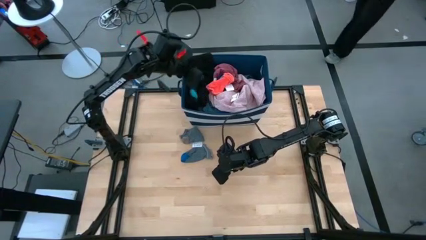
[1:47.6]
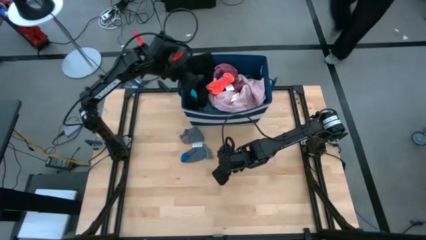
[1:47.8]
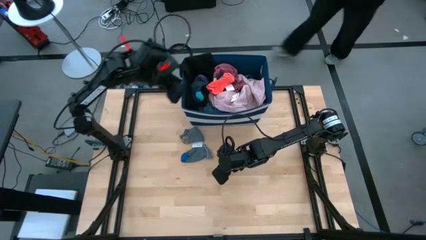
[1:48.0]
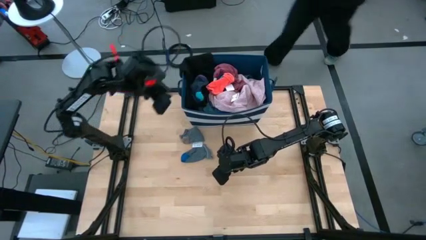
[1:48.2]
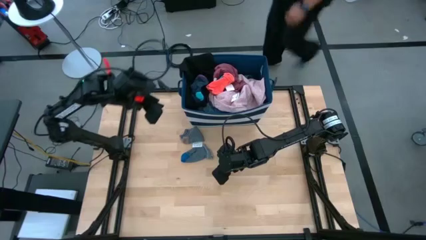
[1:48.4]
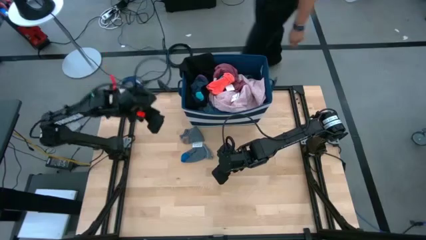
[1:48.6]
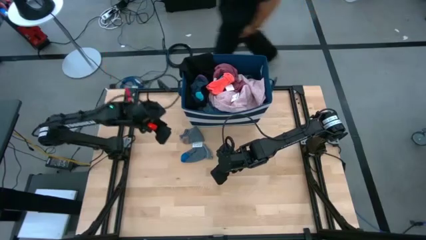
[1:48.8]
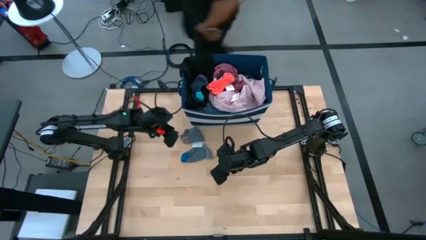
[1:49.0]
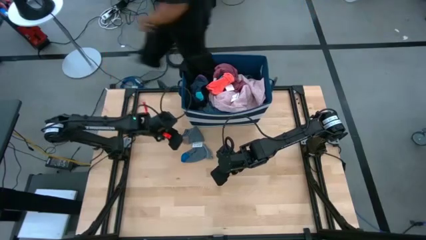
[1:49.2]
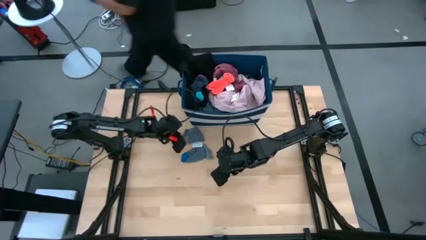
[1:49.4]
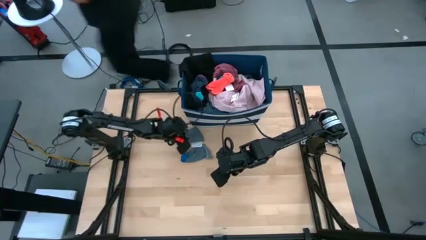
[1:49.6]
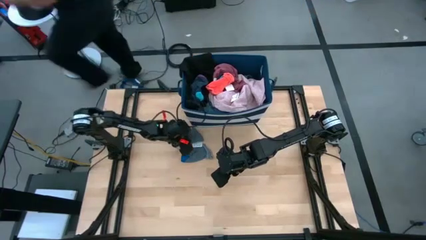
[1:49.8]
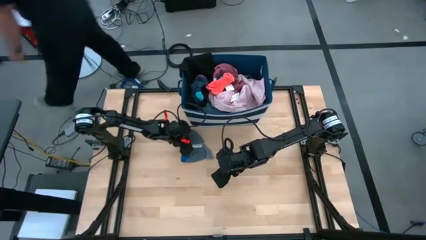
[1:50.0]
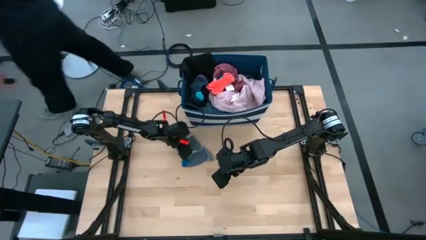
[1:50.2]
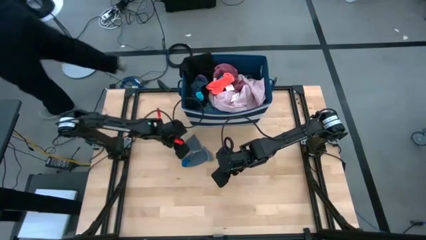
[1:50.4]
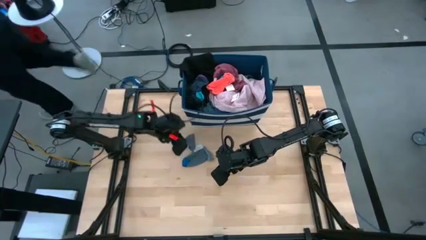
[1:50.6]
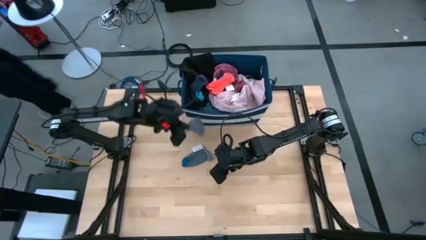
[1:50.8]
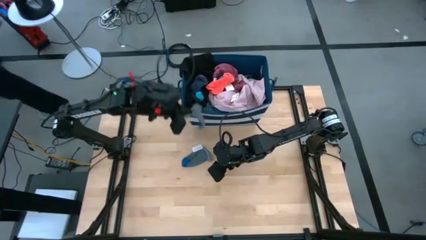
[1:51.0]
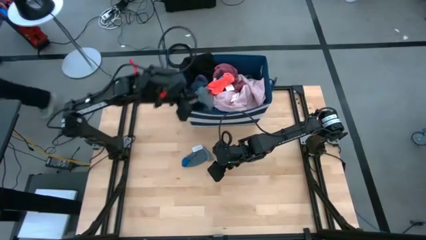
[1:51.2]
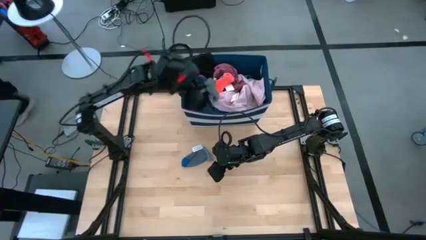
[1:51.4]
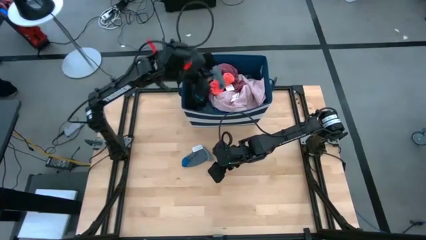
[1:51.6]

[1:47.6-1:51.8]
Task: Sort clothes
Put the gray sock into the blue bin

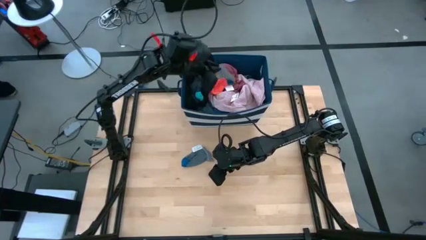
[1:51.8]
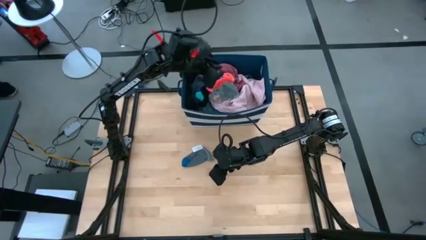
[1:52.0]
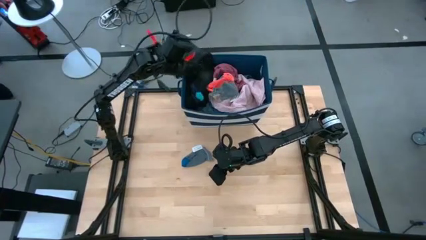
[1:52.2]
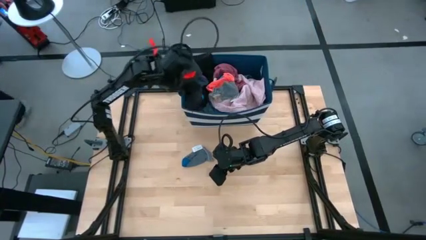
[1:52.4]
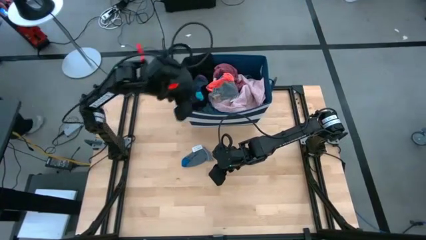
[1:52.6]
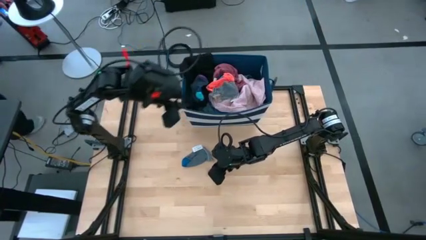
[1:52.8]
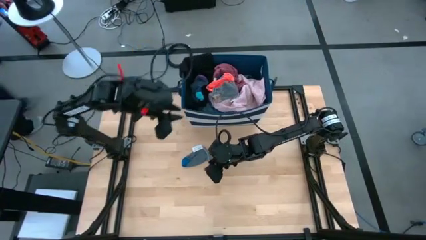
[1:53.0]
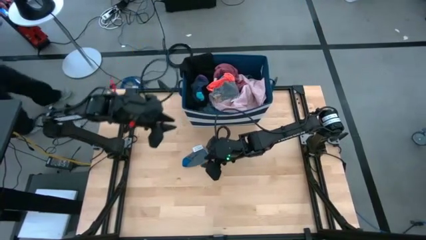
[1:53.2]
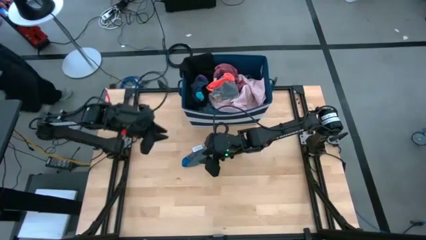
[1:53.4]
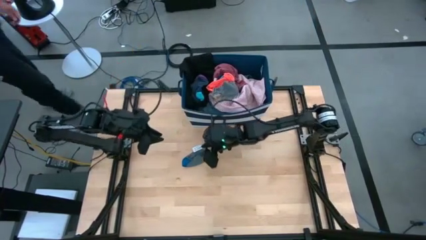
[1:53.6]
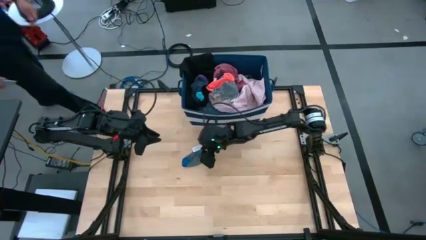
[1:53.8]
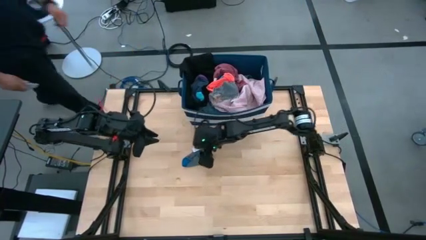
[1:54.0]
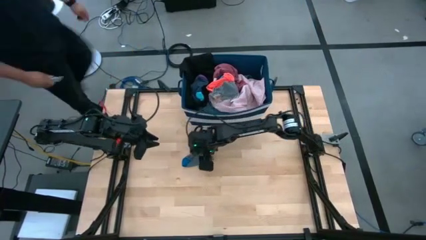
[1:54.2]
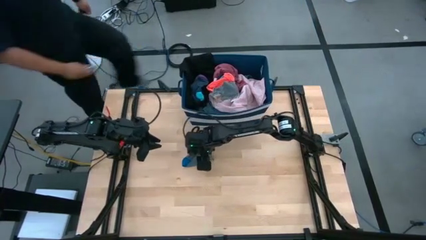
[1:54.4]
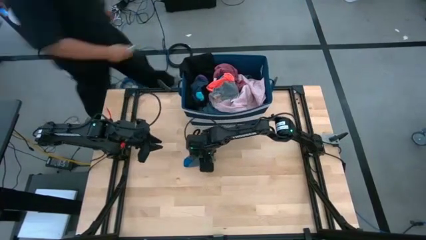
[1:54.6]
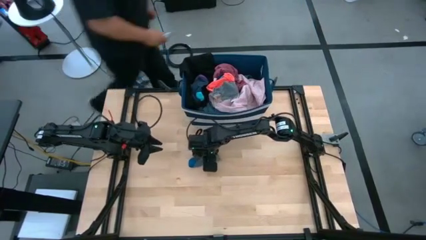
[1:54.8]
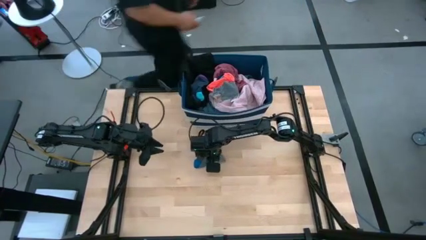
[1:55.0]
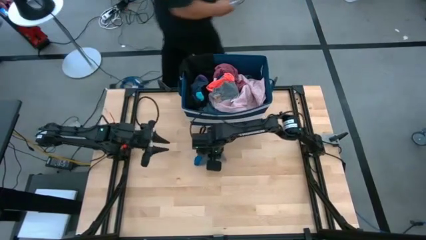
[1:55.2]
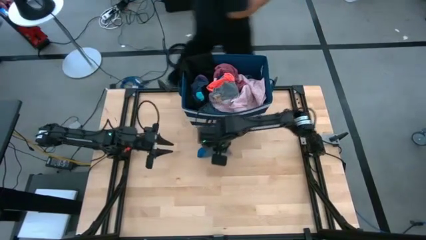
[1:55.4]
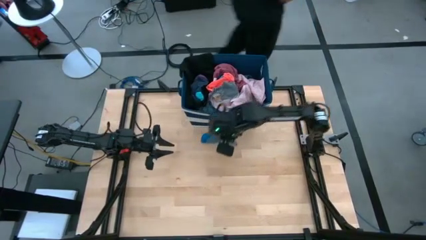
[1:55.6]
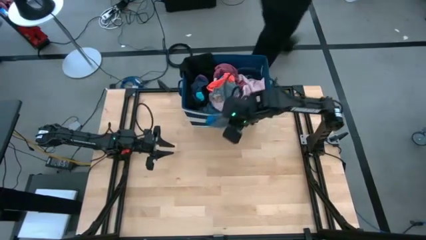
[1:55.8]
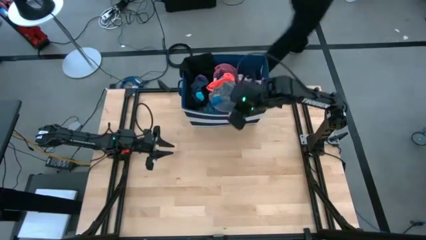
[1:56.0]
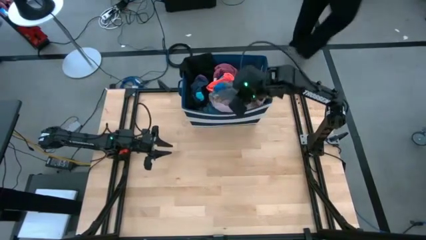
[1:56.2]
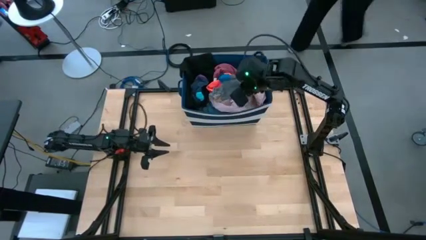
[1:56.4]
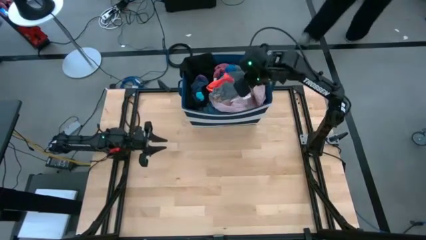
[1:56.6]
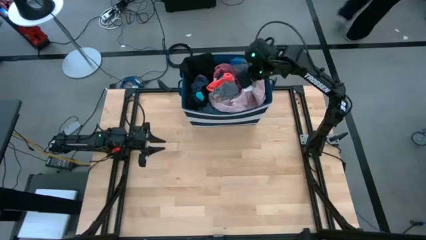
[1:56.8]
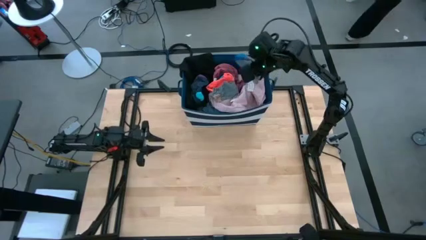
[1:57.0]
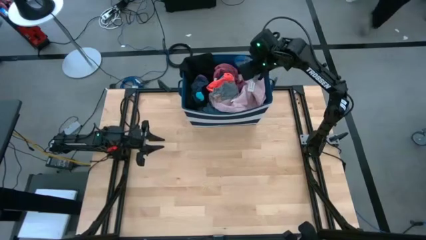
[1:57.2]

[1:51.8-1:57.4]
Put the gray sock into the blue bin

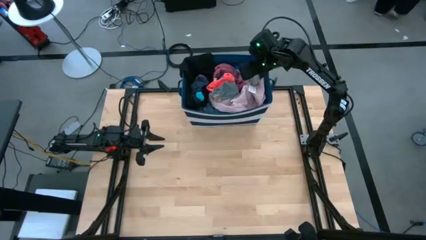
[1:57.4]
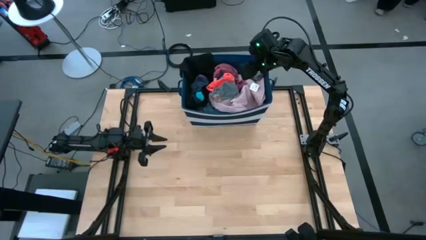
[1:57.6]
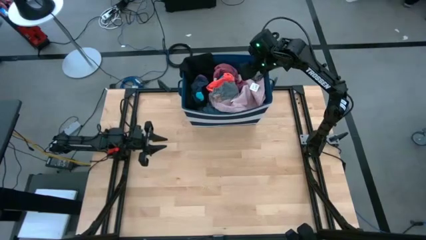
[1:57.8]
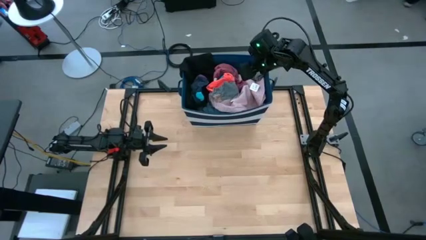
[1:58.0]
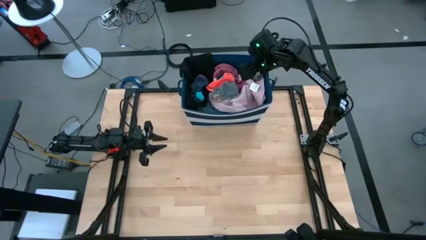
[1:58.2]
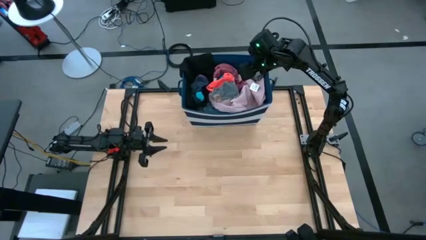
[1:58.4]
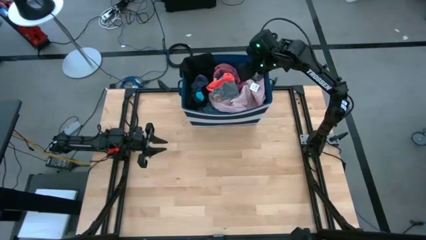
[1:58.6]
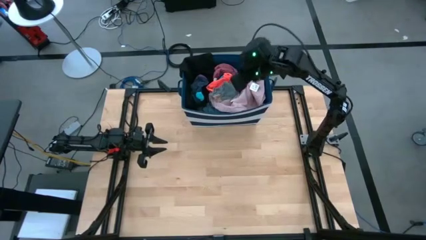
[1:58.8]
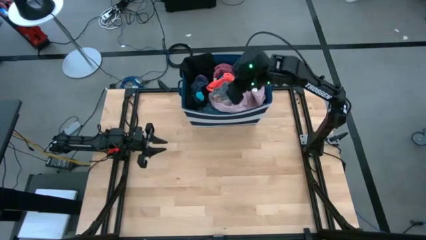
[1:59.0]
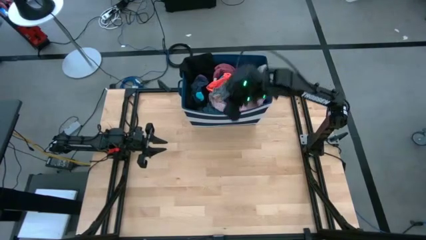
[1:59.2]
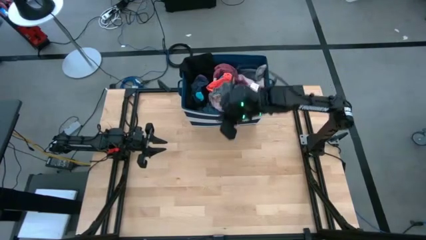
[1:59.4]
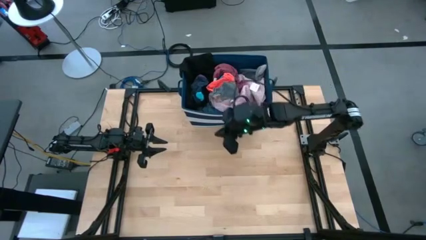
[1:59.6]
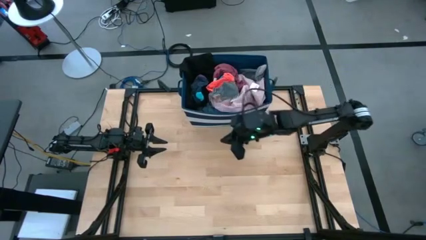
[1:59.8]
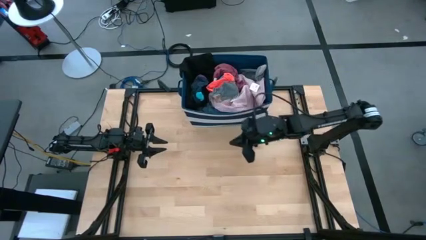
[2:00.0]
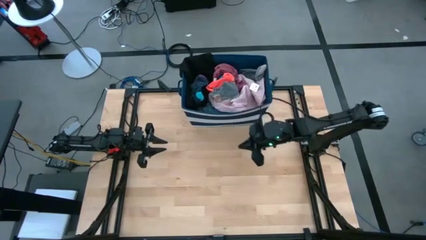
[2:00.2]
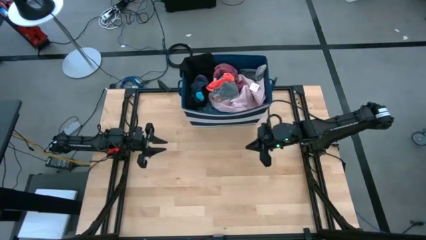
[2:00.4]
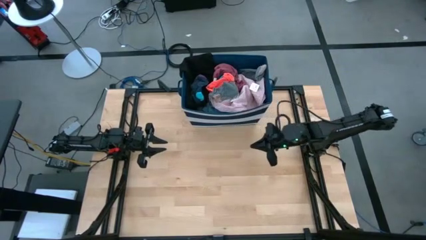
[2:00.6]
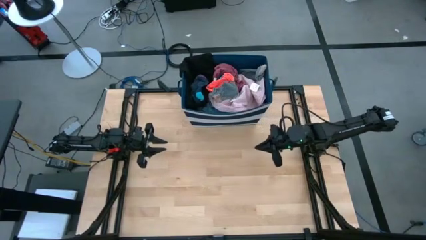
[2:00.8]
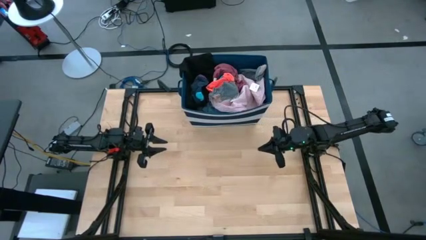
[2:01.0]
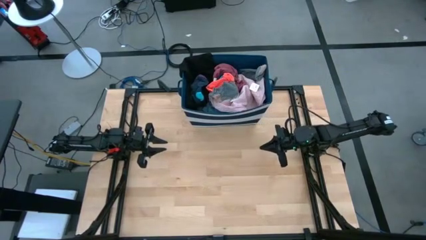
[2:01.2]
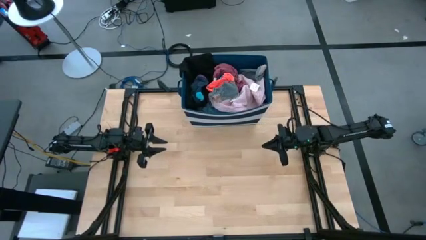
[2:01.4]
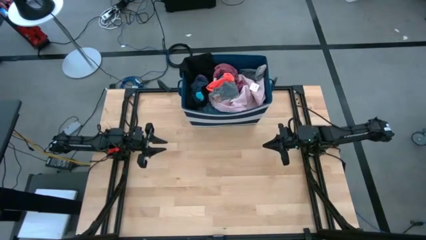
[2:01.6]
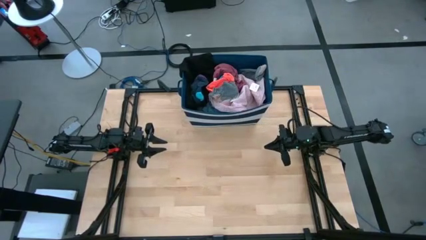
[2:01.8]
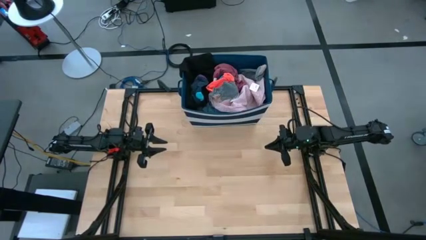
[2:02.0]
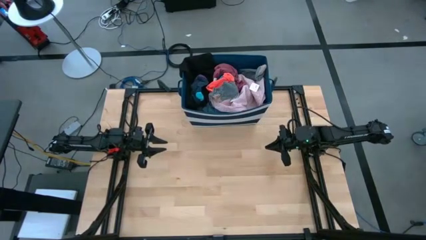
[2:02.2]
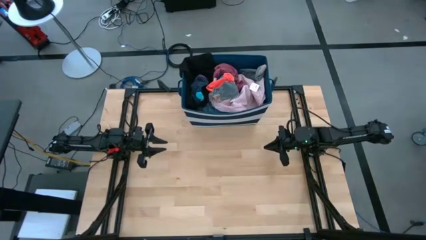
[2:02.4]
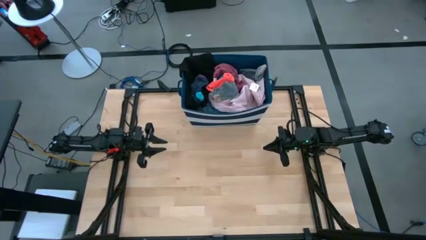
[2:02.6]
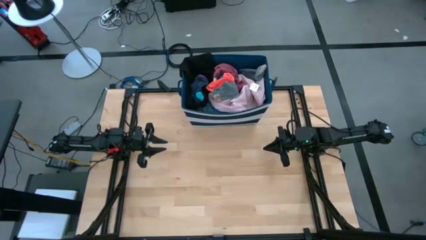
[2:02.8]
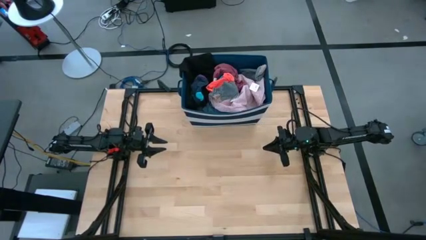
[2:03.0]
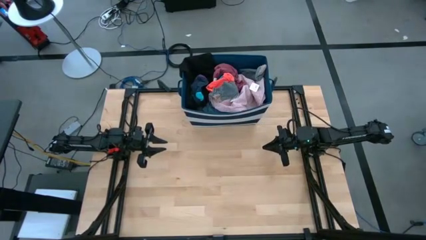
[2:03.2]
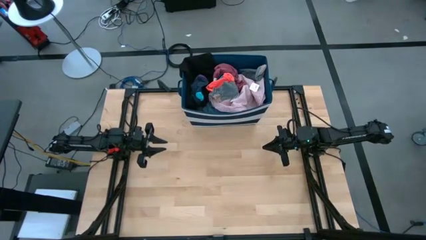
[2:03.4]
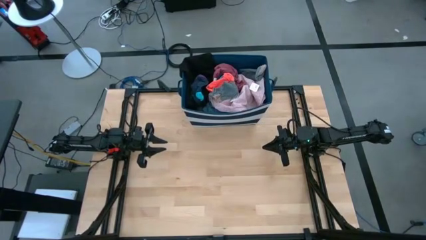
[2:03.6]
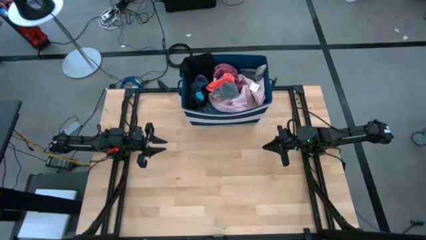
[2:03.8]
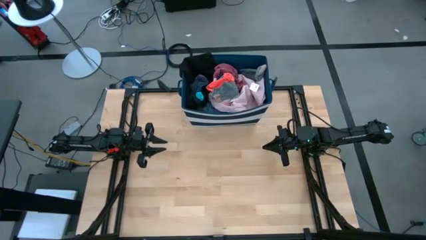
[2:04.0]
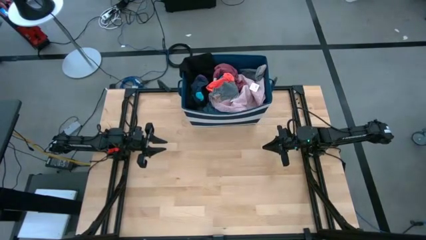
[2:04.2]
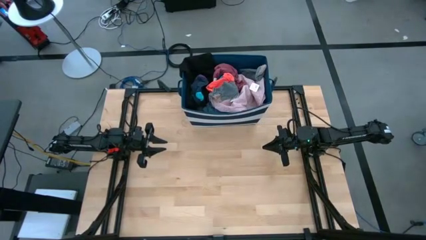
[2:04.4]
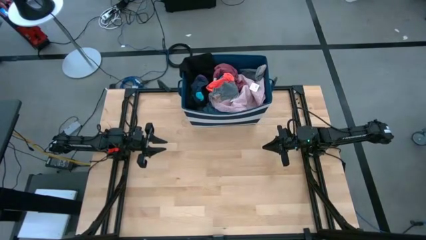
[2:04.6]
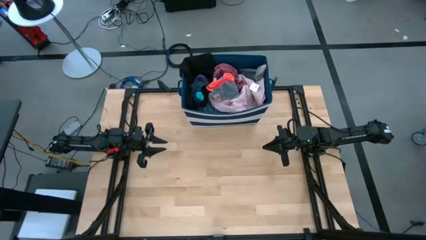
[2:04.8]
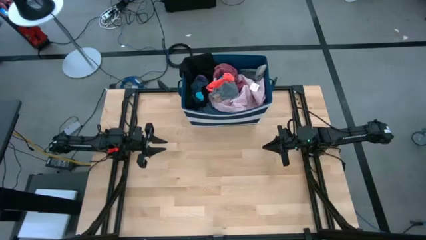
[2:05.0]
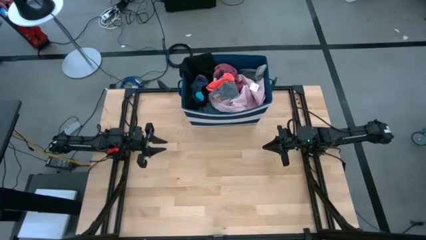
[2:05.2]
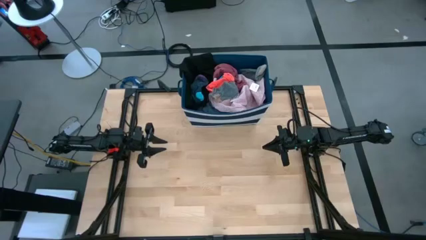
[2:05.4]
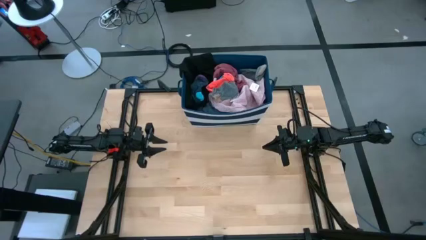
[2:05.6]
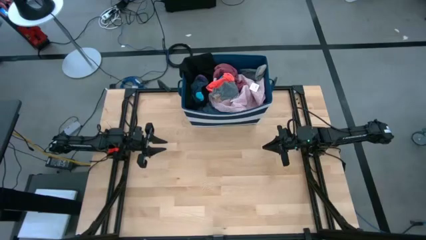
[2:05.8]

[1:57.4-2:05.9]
Return to Home Position
